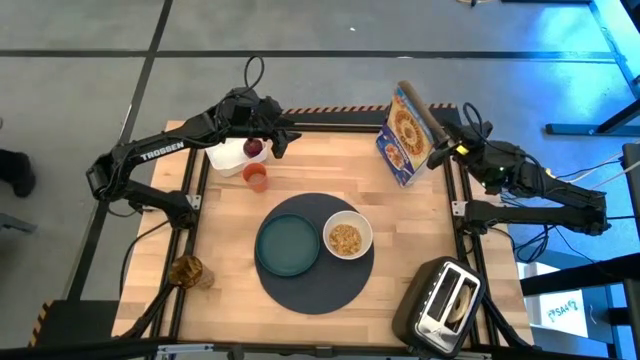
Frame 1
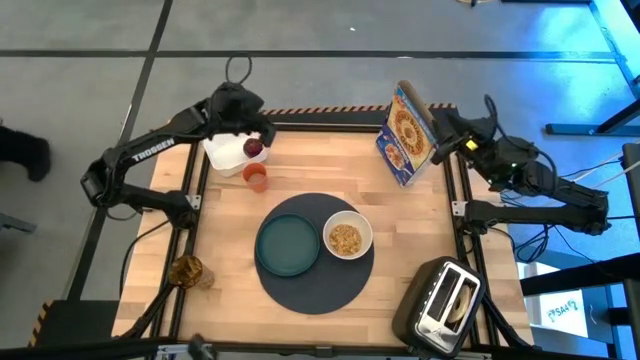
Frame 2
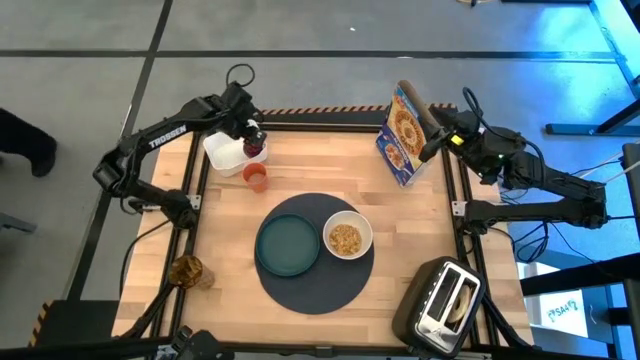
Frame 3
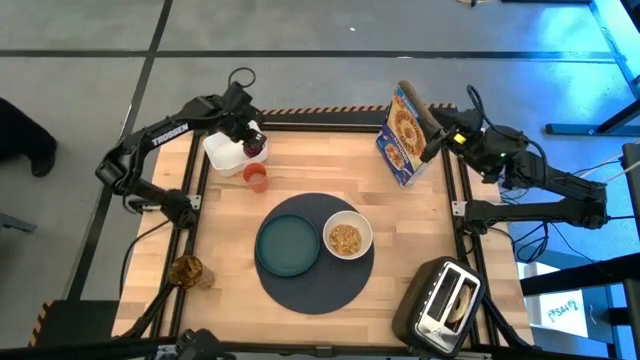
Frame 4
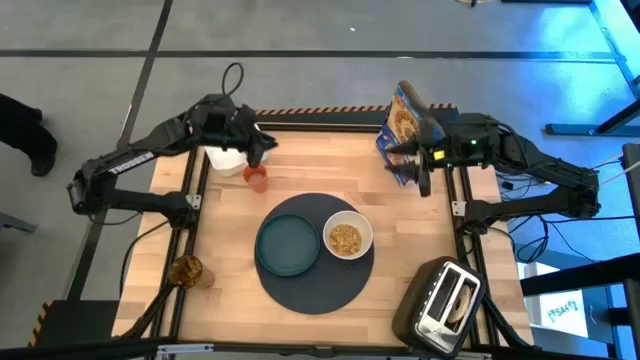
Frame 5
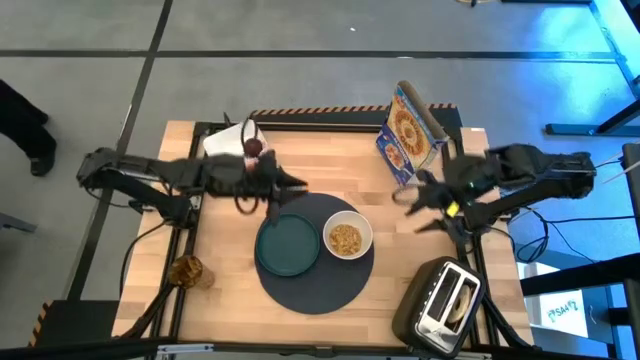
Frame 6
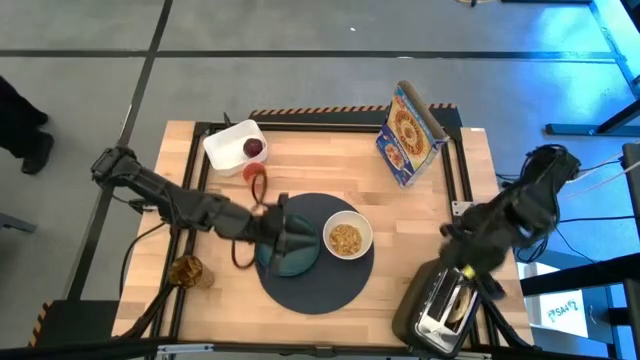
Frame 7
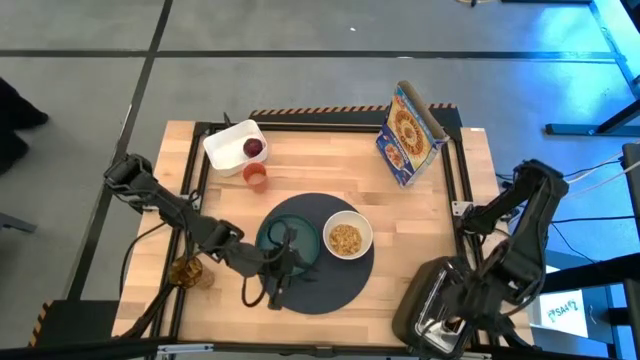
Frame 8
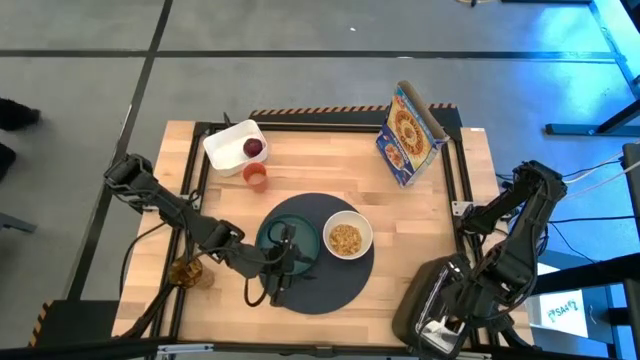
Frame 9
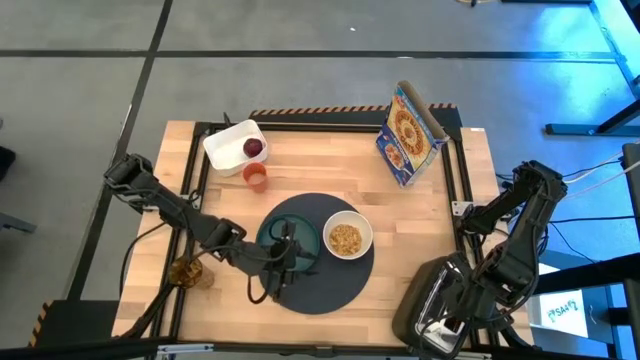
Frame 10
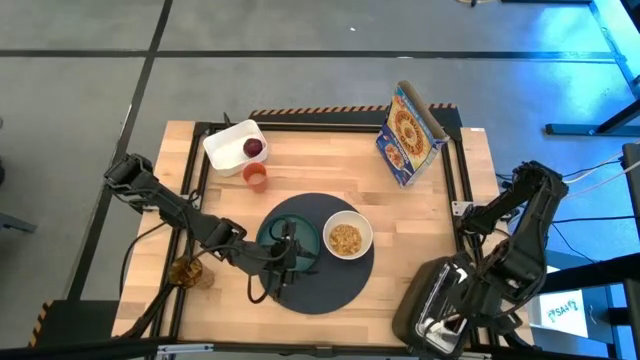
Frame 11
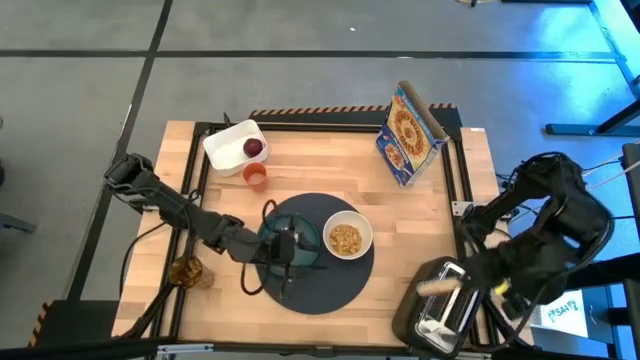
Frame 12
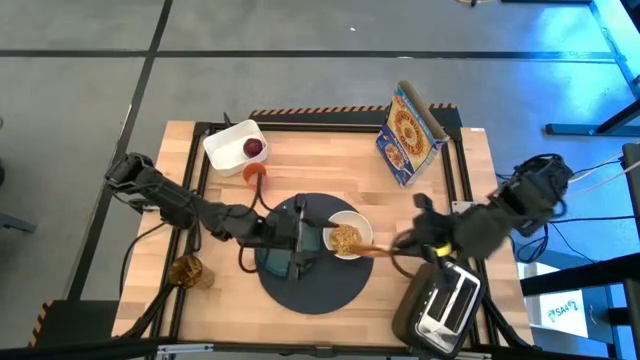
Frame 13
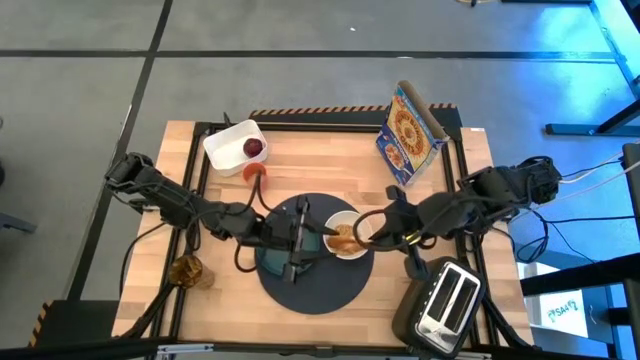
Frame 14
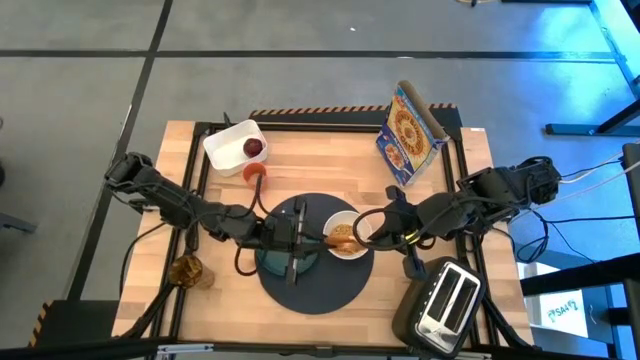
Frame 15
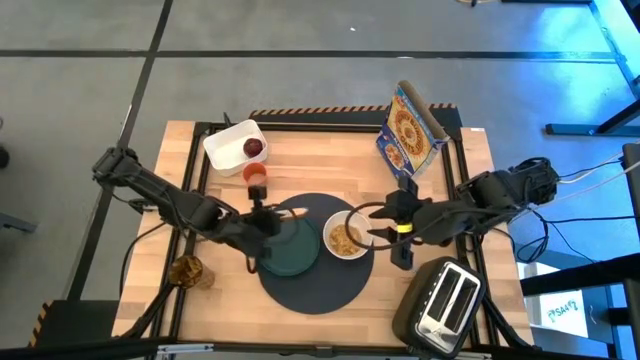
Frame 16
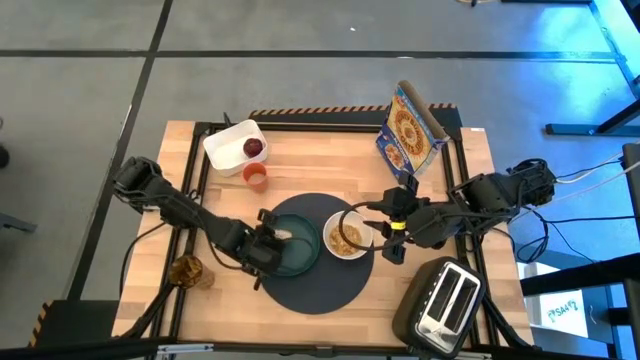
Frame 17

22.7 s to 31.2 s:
Task: Arrange a breakfast setting
Put the toasted bagel on the blue plate

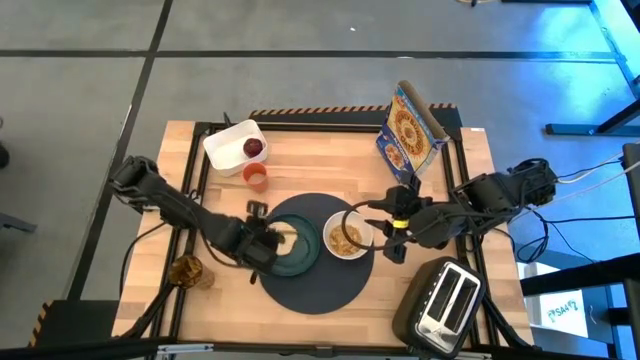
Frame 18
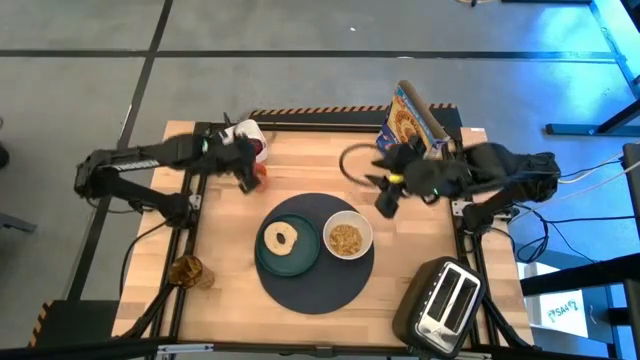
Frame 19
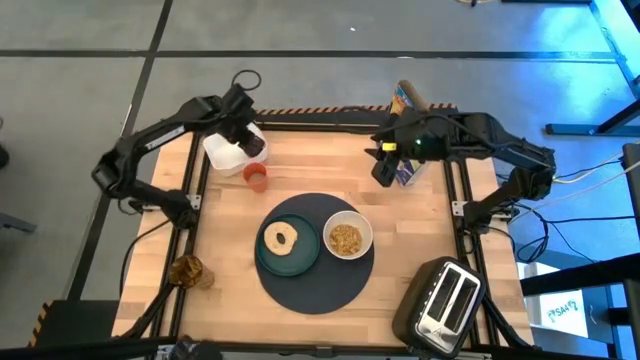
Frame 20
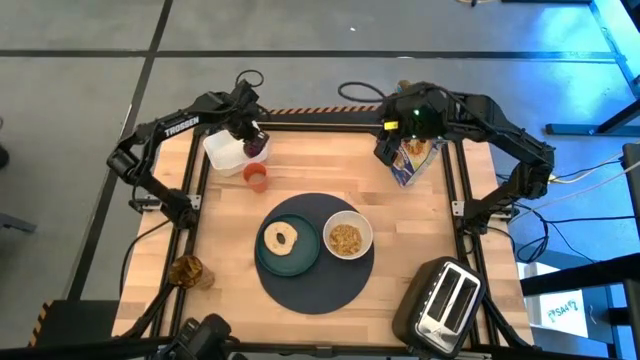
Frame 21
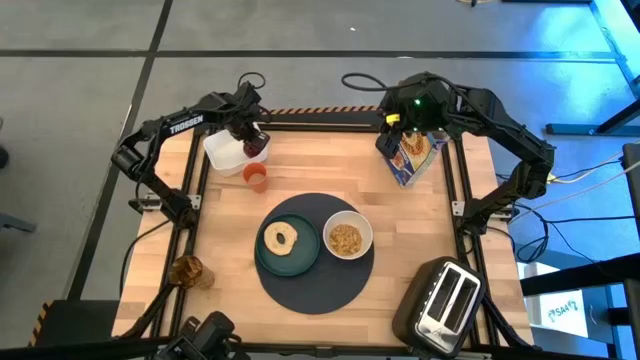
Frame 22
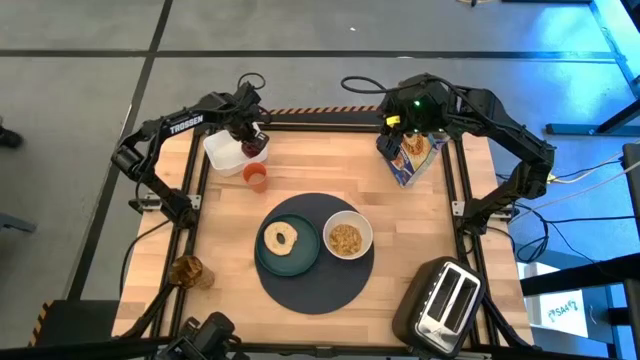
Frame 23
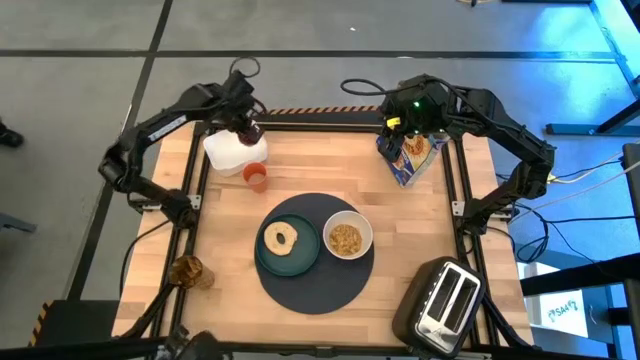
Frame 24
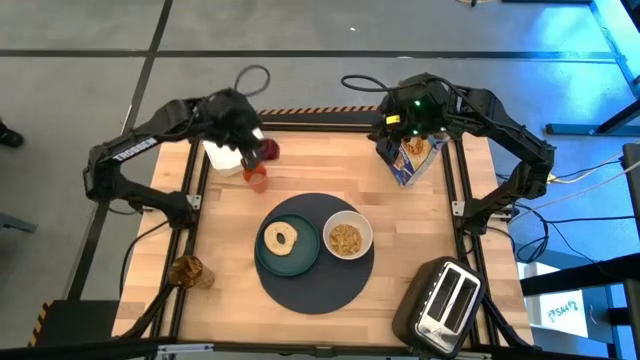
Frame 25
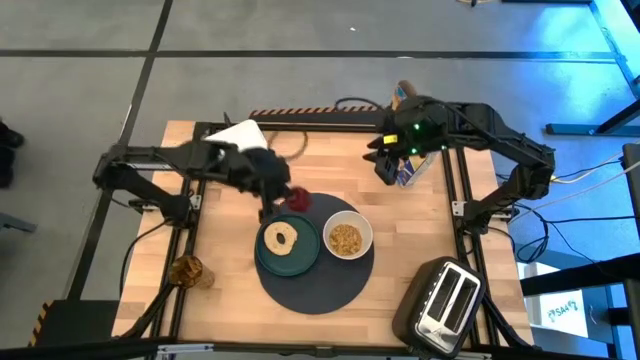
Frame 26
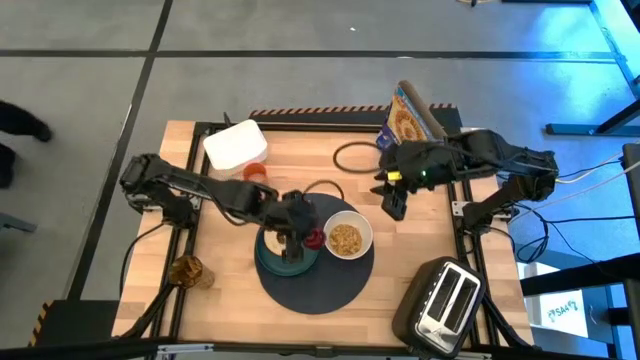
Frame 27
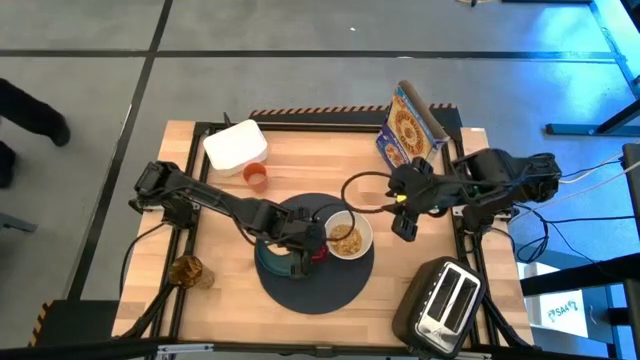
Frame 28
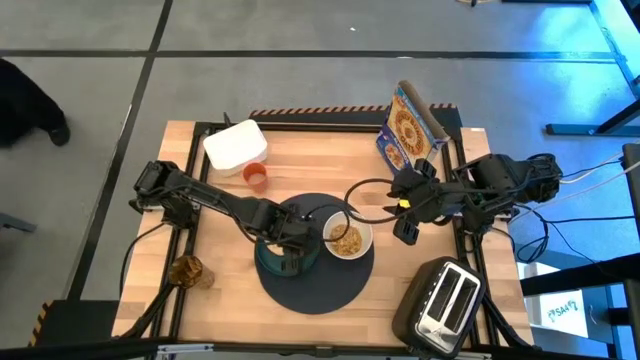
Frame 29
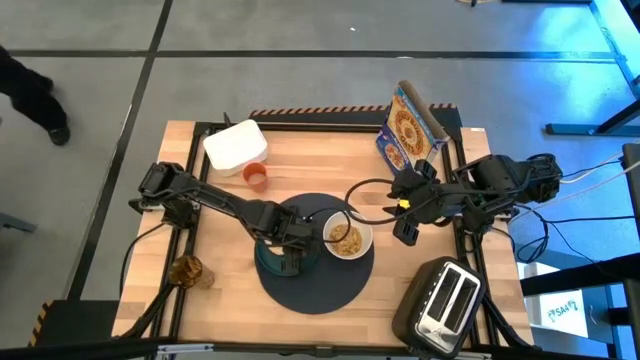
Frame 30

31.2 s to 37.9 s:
Put the apple from the white bin beside the toasted bagel on the blue plate

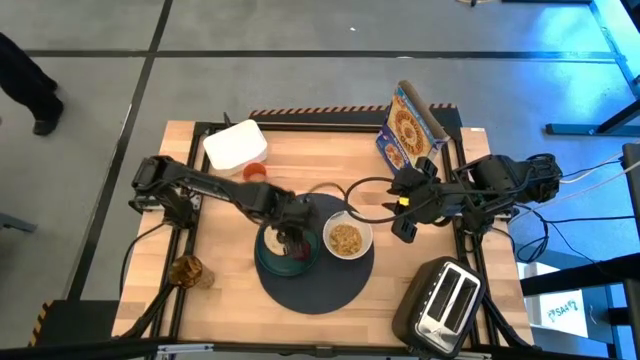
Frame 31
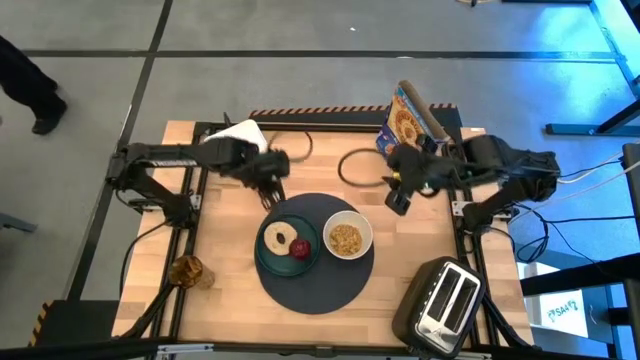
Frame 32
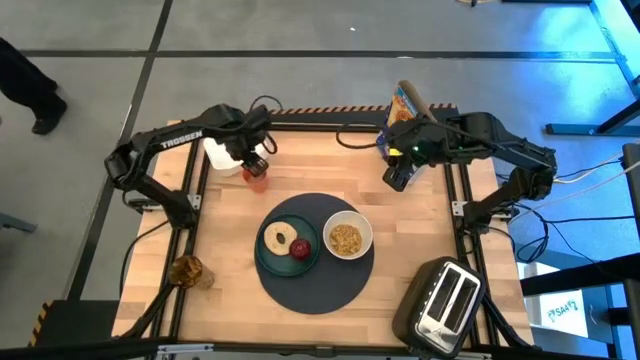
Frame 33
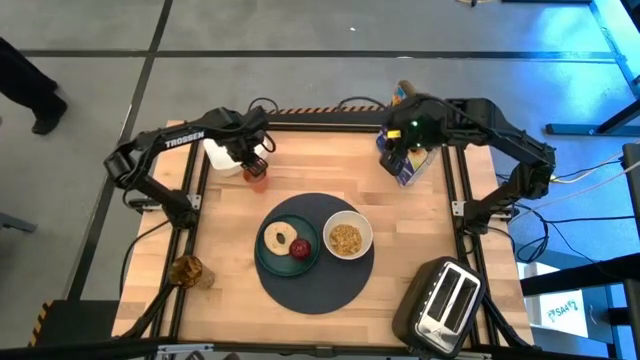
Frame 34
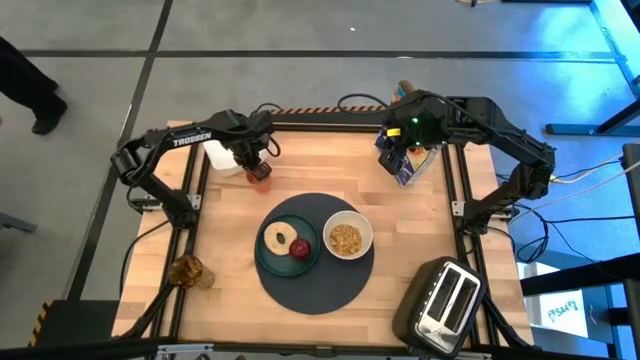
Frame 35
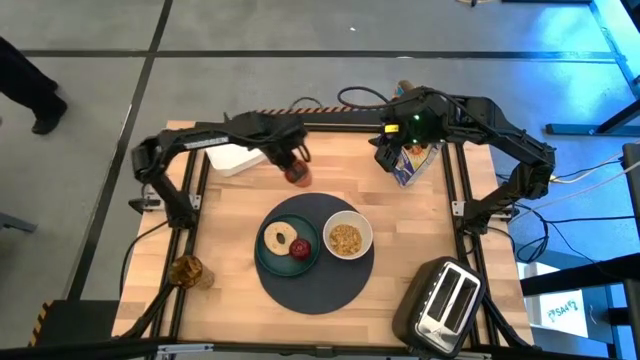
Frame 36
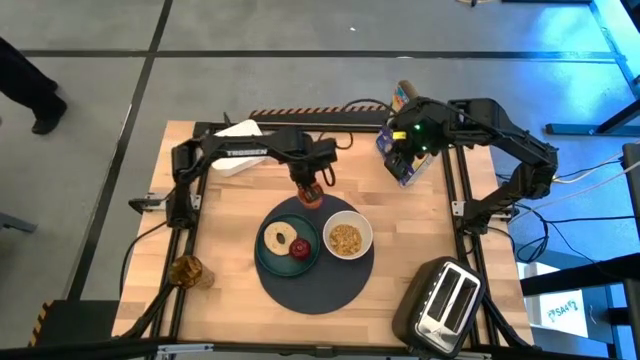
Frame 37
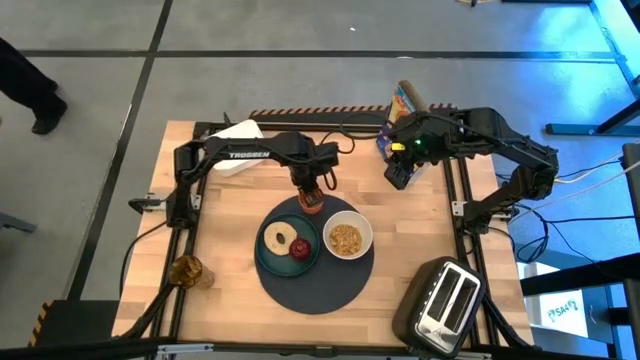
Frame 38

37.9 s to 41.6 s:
Put the orange cup on the black table mat to the top right of the blue plate

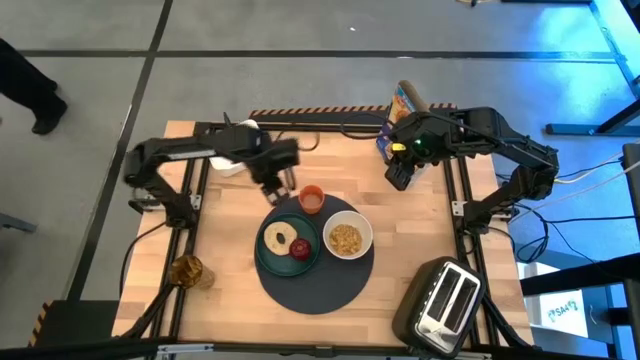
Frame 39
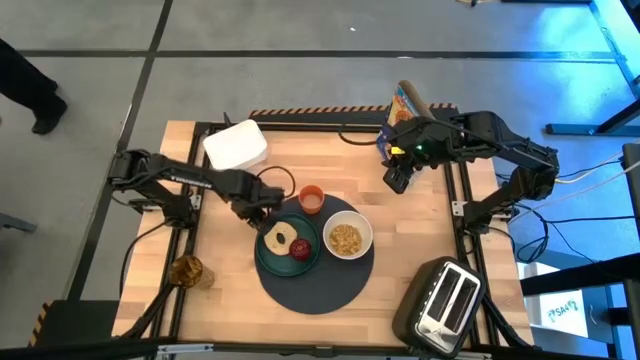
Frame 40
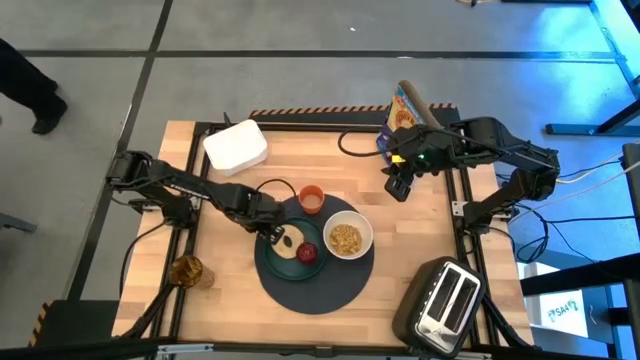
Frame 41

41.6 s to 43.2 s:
Adjust the blue plate on the black table mat
